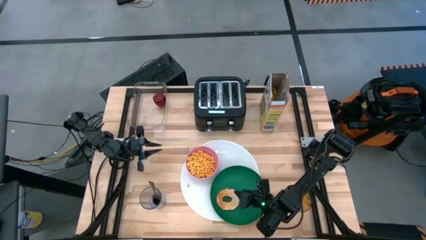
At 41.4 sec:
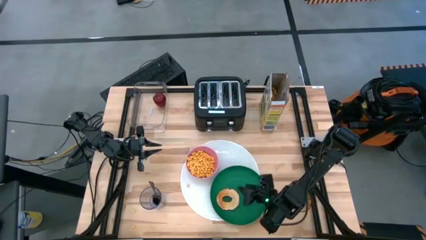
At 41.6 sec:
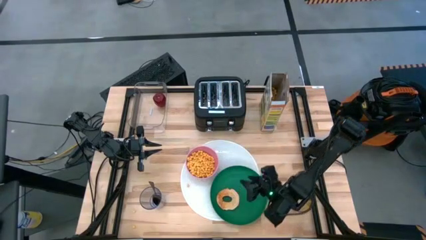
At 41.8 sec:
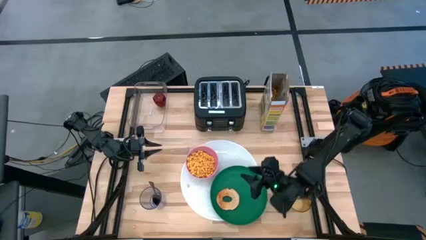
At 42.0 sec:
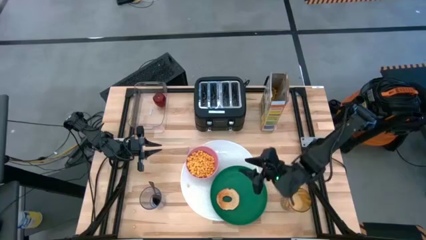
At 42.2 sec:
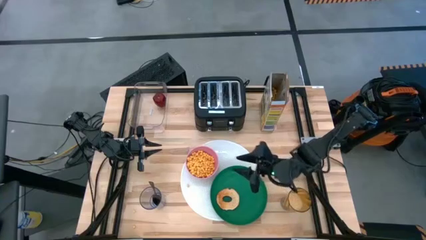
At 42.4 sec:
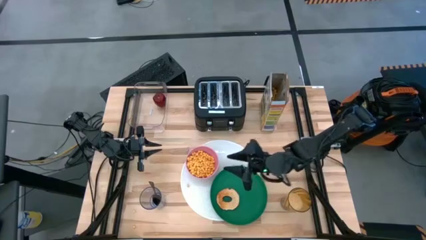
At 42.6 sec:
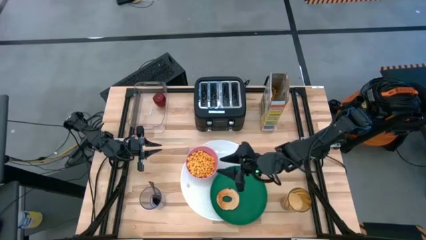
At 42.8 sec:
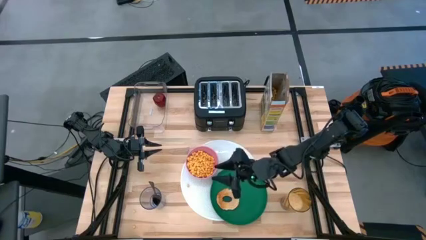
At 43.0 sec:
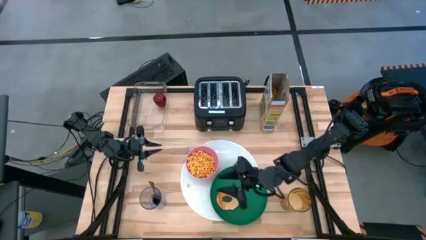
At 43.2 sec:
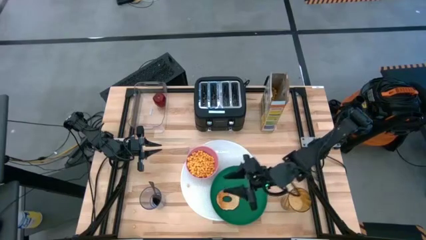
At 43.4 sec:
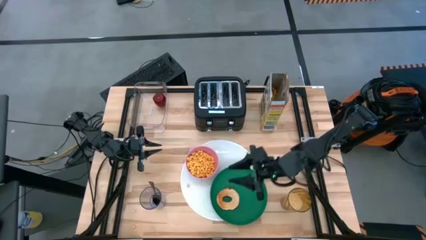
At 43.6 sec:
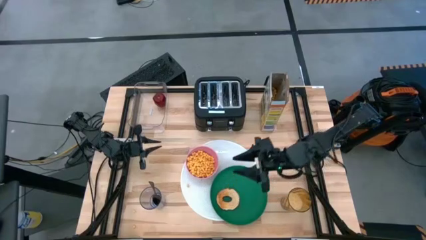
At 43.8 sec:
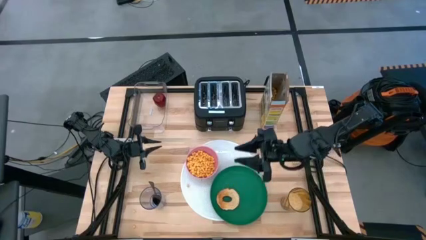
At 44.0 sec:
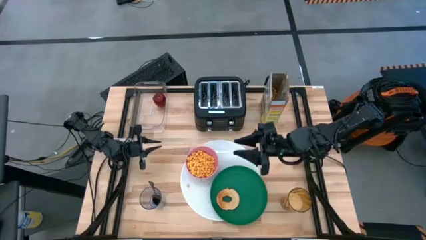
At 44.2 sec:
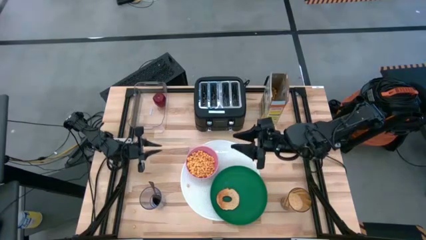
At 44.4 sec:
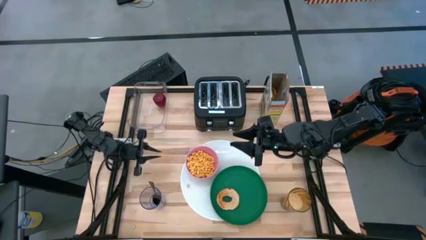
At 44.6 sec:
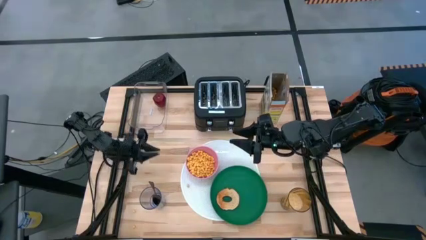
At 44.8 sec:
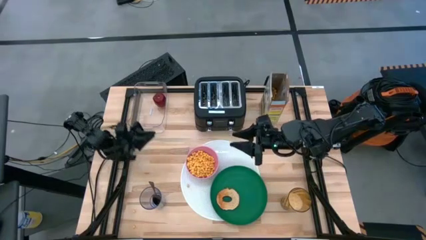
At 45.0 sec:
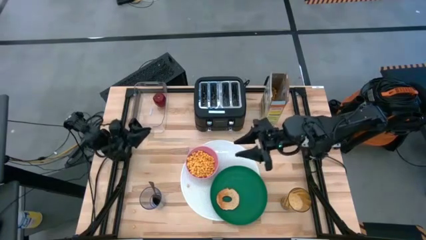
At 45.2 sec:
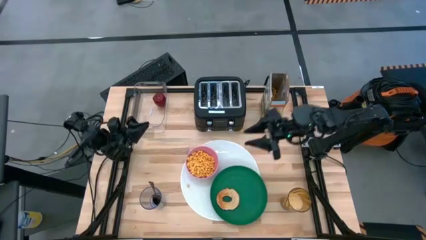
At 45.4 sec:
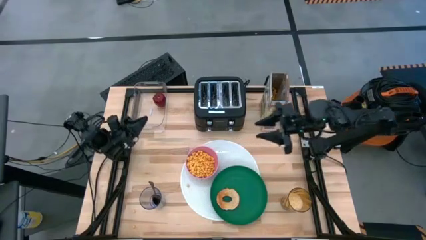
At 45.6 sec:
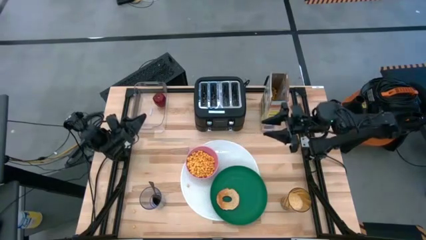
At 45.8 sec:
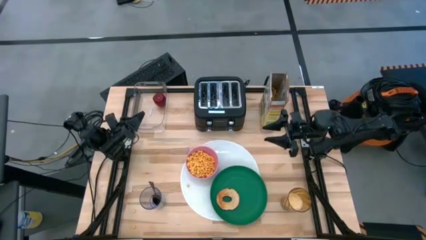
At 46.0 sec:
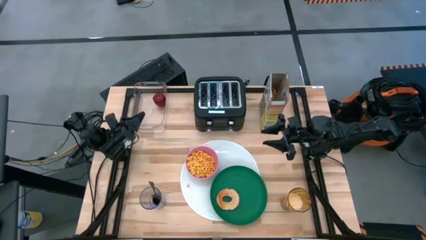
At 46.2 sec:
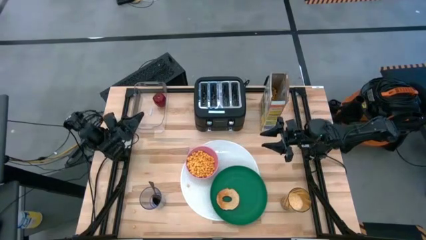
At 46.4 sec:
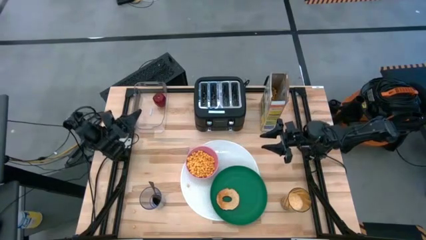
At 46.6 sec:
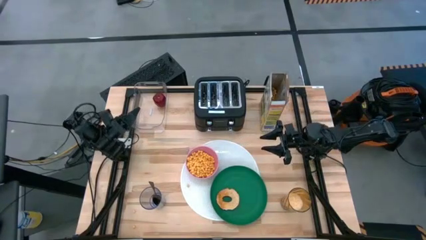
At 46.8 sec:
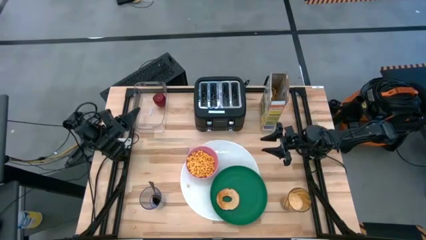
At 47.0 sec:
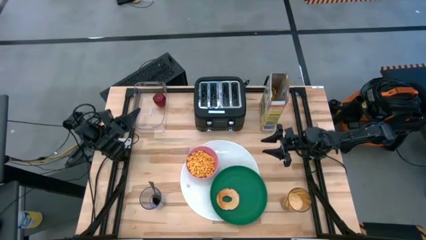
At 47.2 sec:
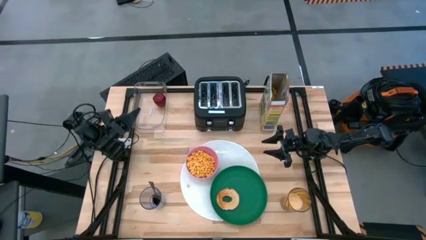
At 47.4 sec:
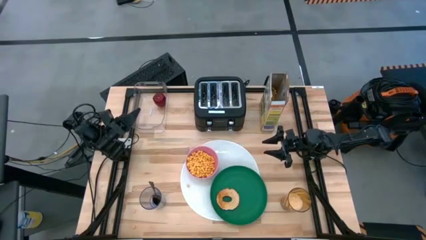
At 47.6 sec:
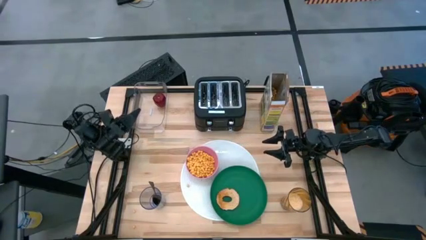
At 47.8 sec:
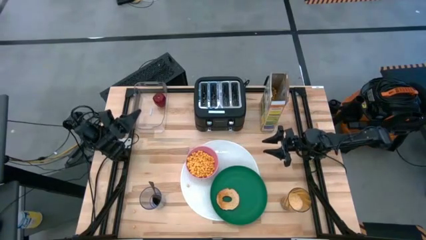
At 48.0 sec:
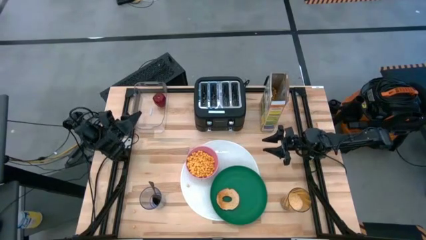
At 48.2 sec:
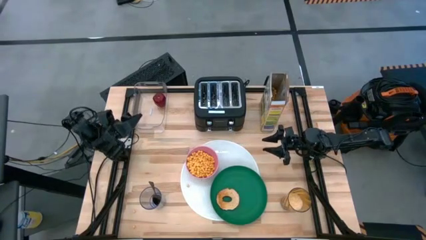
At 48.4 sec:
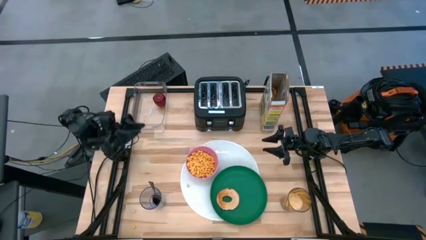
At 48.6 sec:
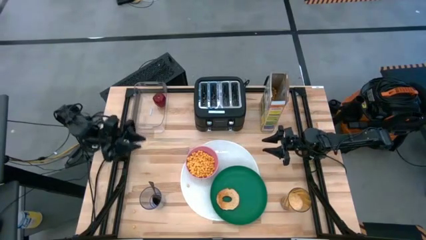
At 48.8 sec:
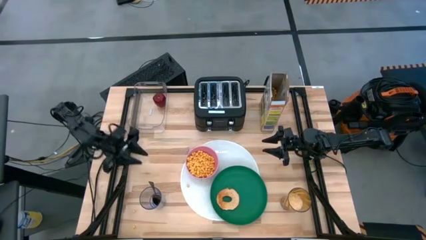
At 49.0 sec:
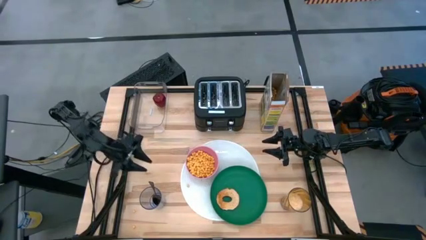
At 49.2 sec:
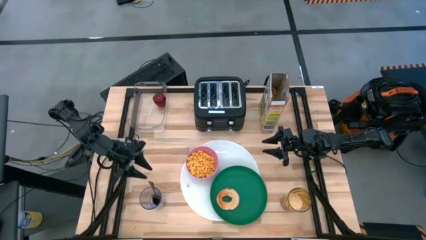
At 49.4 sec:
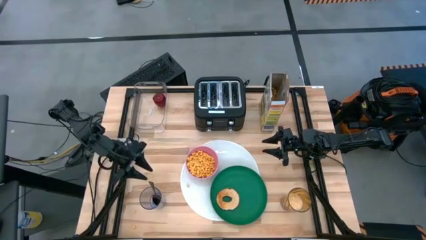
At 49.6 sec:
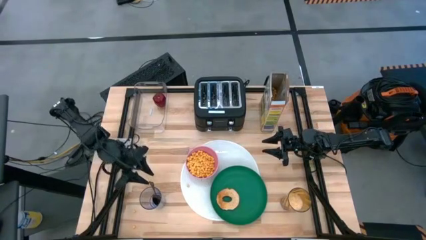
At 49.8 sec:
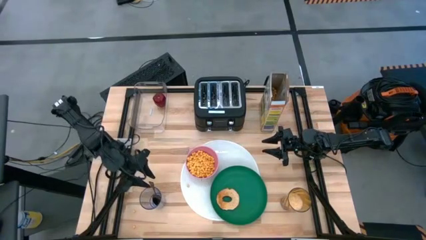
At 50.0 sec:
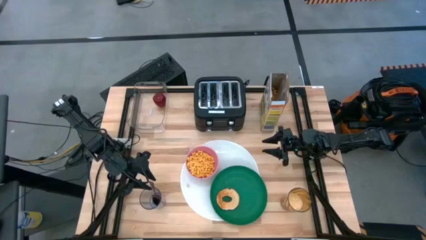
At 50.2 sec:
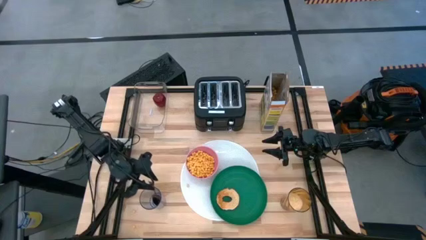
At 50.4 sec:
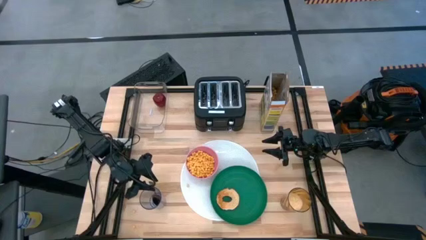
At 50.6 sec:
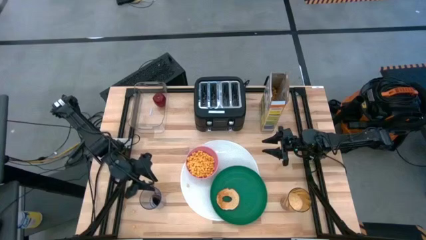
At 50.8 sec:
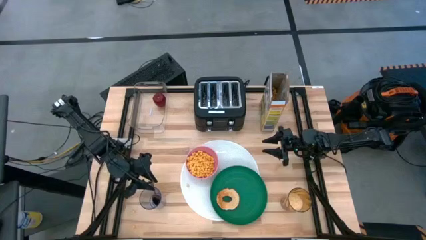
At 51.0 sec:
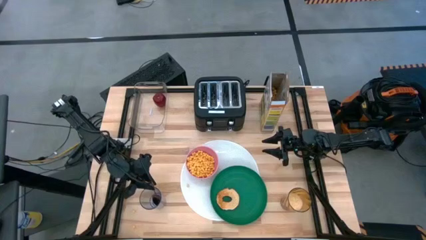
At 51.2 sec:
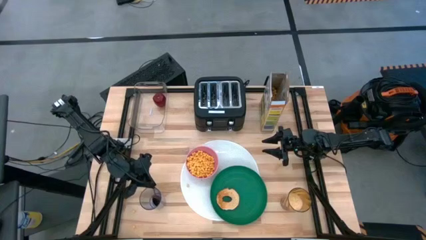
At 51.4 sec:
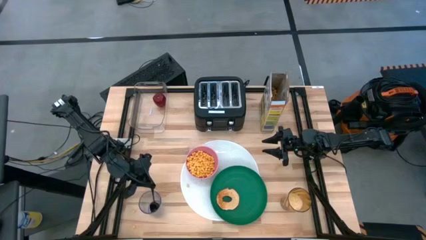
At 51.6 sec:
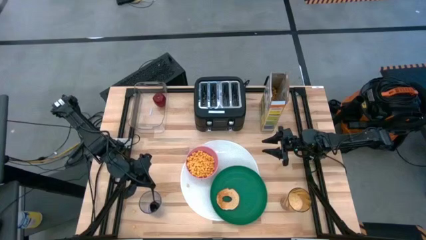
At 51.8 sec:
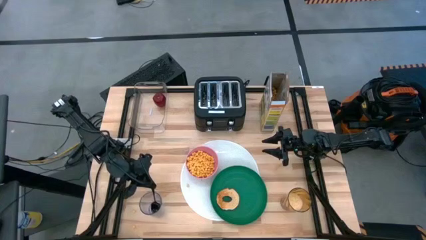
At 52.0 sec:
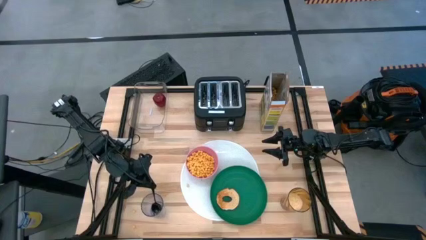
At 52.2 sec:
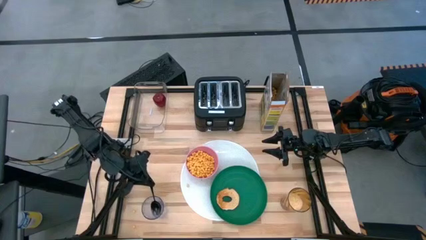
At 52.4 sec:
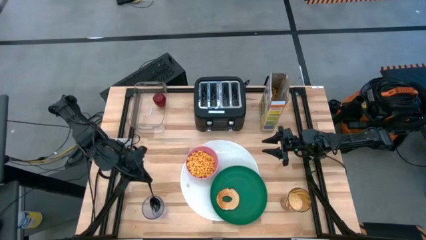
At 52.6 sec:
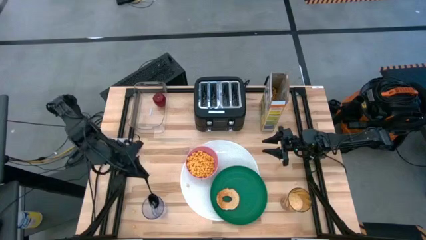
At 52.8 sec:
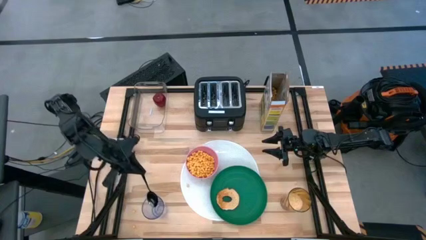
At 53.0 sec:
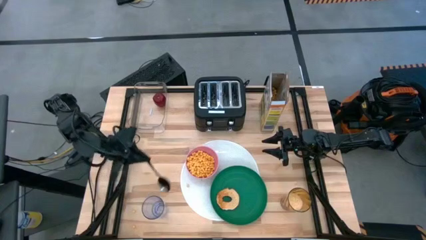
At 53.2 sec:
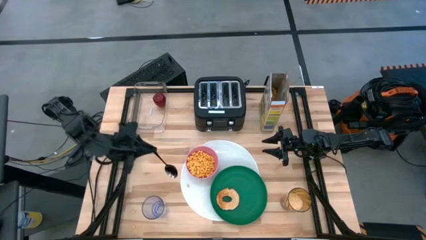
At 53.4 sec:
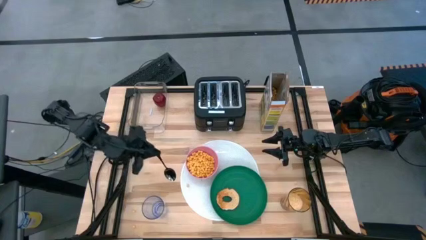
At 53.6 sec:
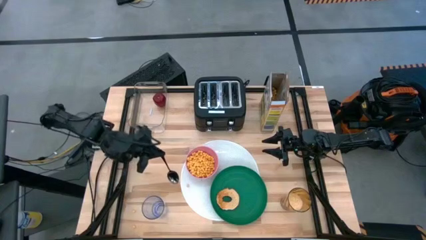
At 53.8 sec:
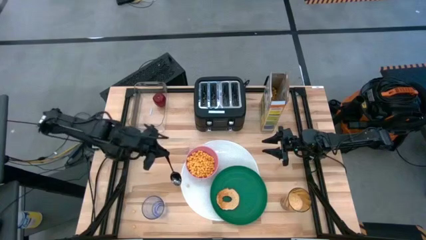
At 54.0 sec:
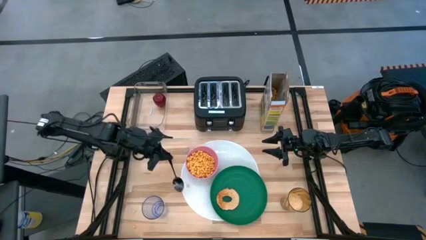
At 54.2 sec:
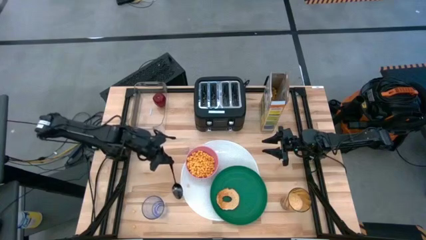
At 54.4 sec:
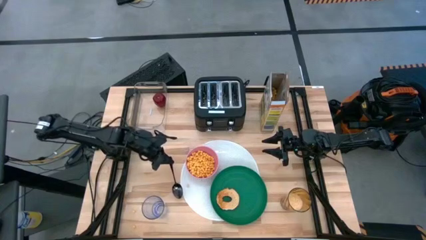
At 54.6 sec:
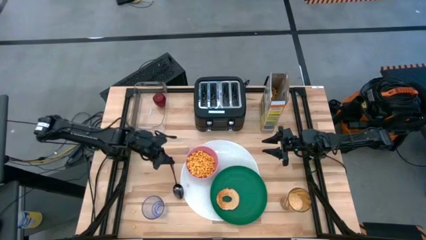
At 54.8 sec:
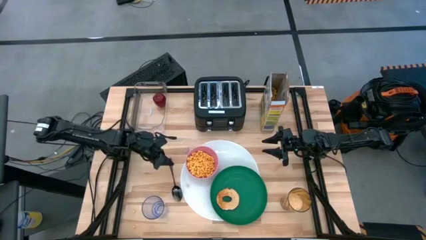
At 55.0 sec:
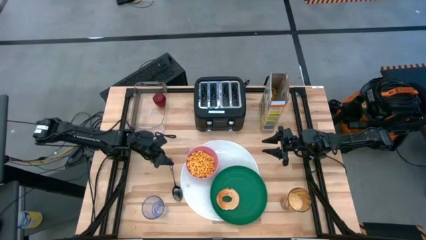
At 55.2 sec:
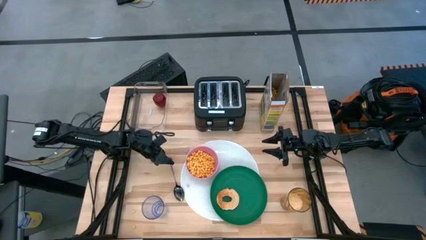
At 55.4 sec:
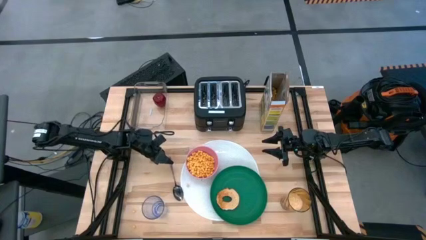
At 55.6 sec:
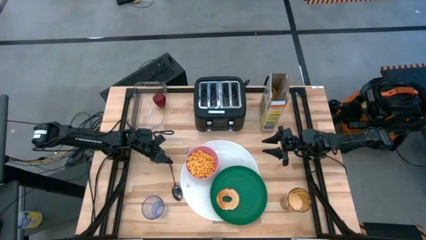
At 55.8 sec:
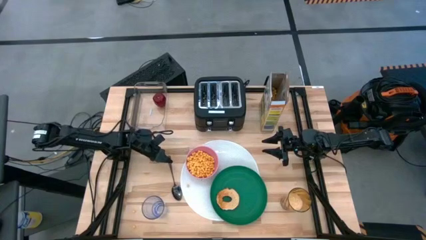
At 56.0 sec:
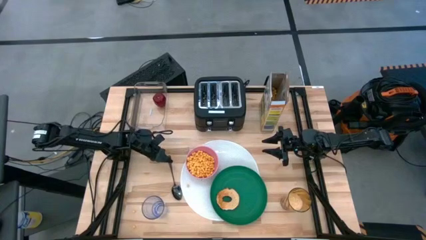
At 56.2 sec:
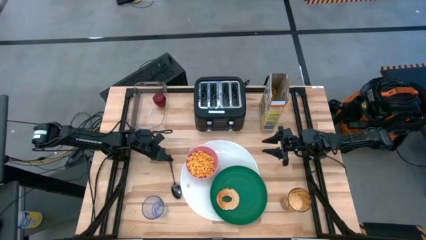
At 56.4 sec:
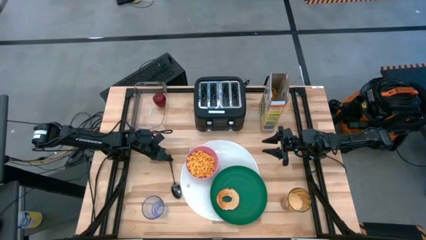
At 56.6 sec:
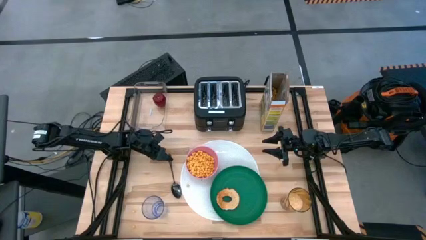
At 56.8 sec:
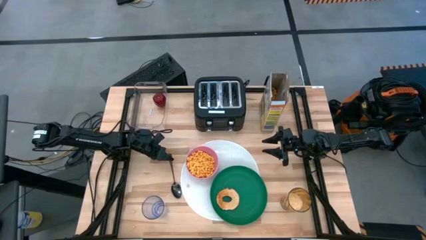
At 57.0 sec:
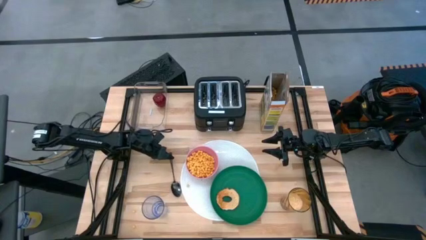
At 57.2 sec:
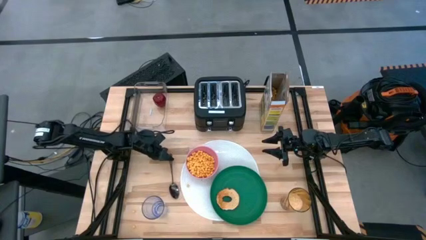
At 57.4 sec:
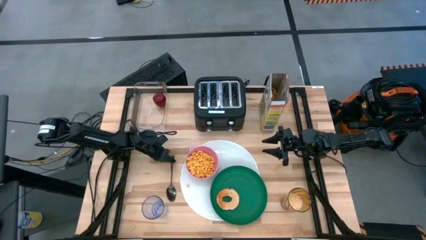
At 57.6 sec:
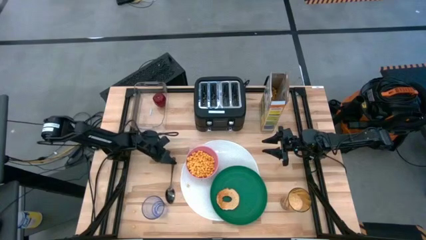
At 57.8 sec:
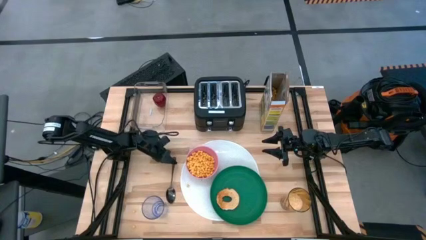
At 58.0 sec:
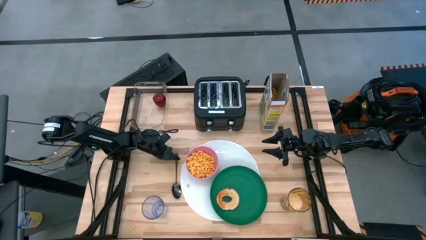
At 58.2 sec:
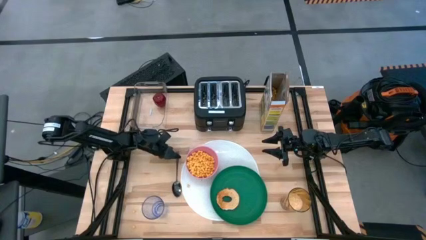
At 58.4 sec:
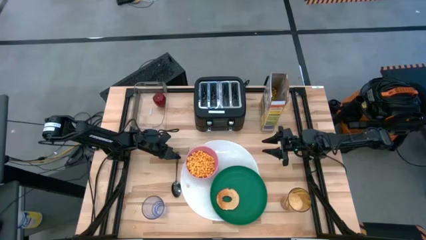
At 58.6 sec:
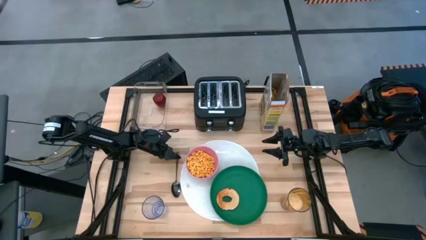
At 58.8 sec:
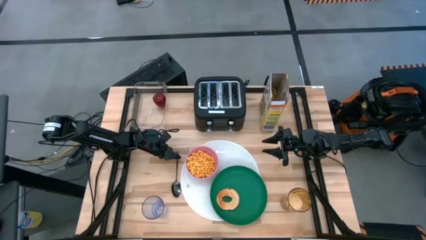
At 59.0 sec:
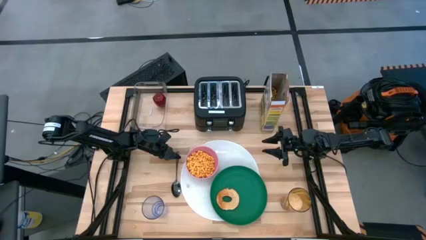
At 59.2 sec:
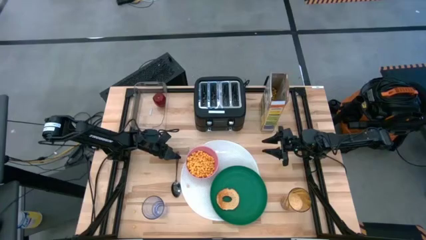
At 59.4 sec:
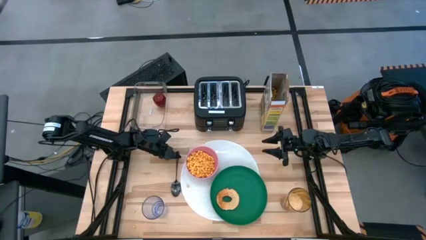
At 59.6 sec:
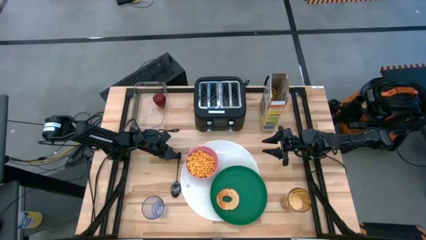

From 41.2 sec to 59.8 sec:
Task: Arrange a breakfast setting
Put the spoon on the left of the pink bowl
